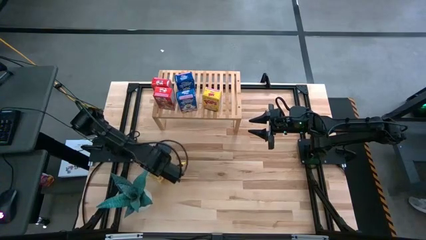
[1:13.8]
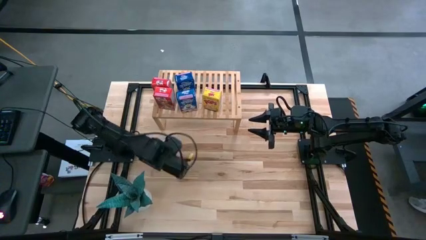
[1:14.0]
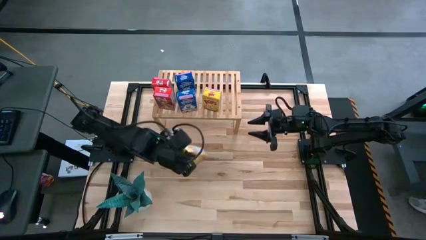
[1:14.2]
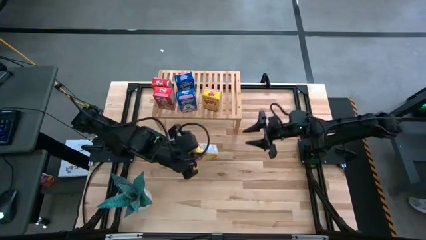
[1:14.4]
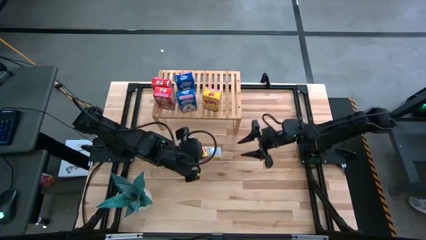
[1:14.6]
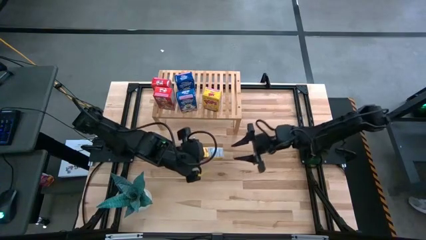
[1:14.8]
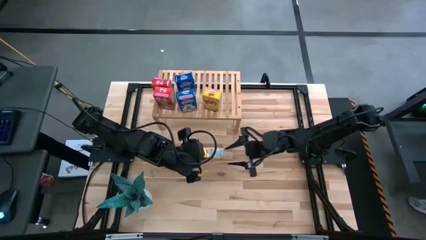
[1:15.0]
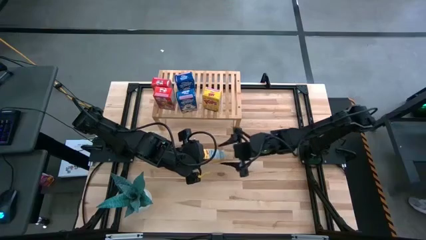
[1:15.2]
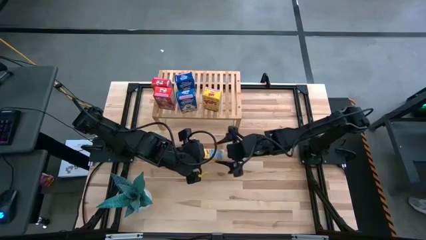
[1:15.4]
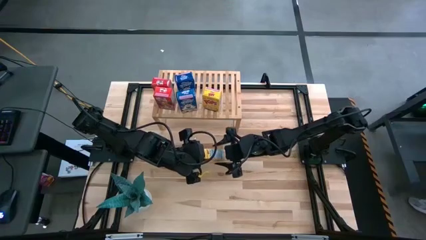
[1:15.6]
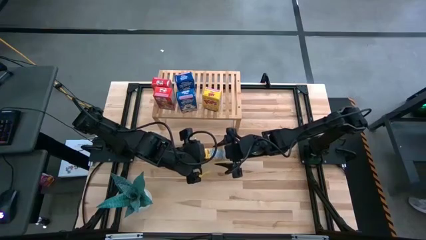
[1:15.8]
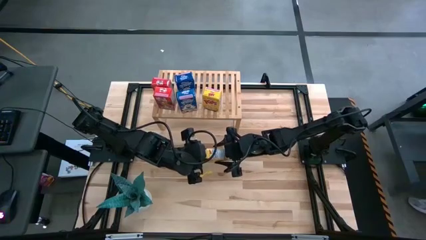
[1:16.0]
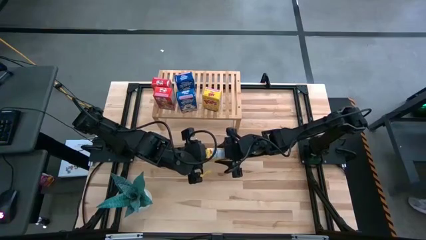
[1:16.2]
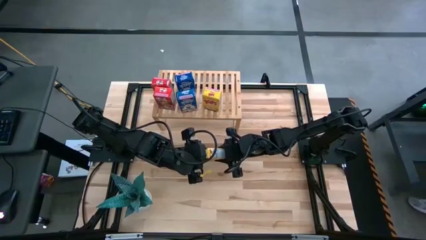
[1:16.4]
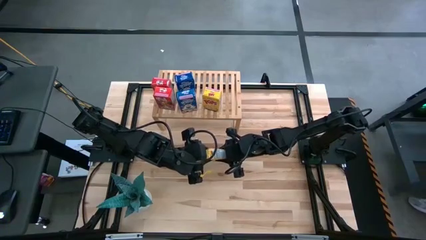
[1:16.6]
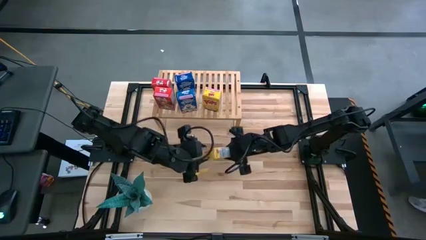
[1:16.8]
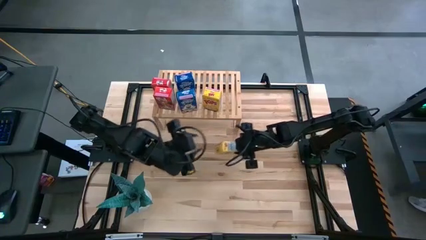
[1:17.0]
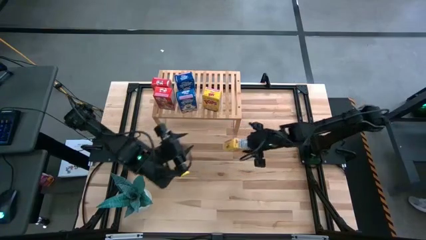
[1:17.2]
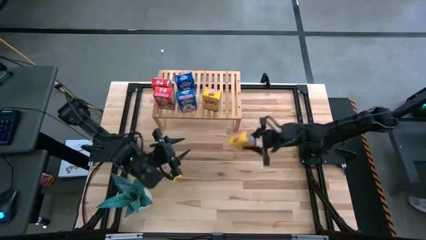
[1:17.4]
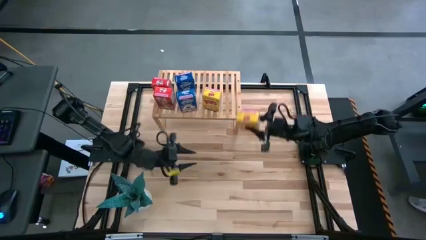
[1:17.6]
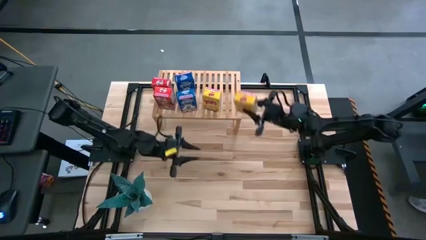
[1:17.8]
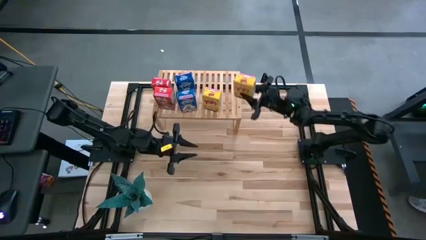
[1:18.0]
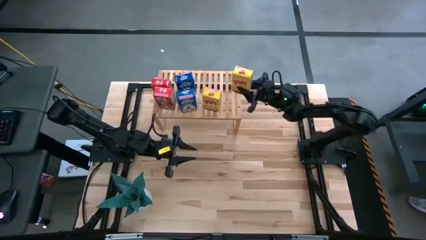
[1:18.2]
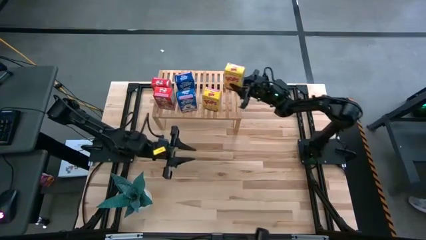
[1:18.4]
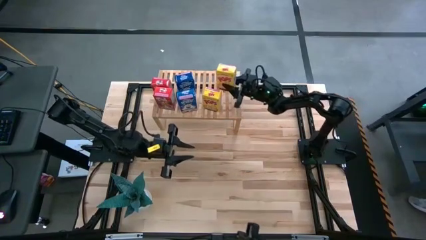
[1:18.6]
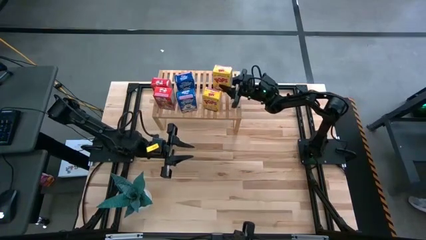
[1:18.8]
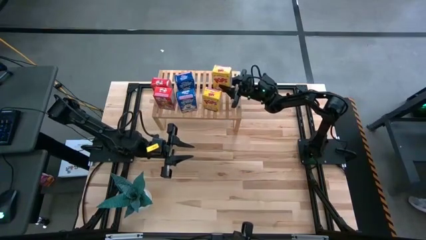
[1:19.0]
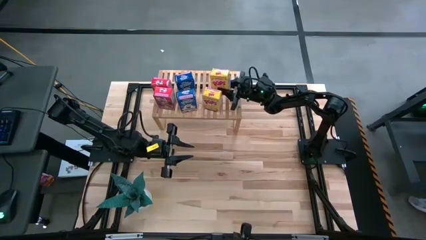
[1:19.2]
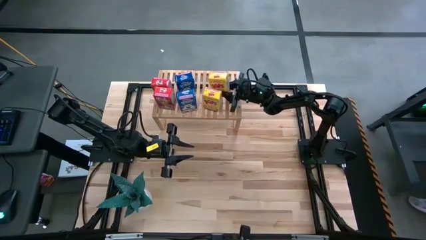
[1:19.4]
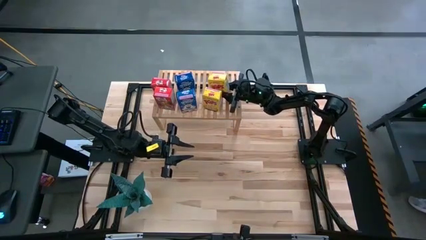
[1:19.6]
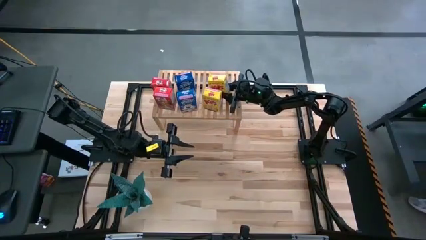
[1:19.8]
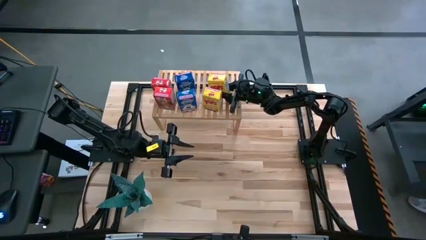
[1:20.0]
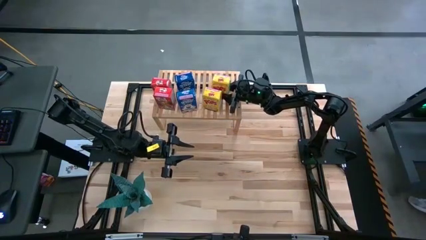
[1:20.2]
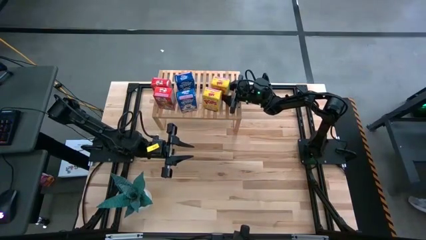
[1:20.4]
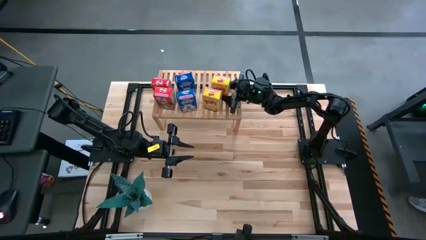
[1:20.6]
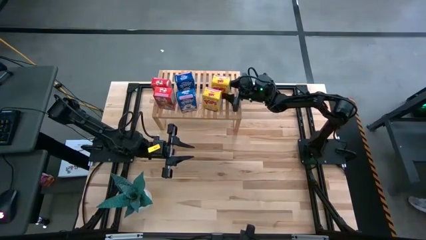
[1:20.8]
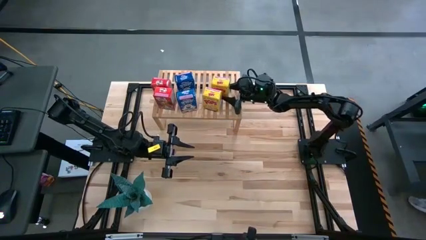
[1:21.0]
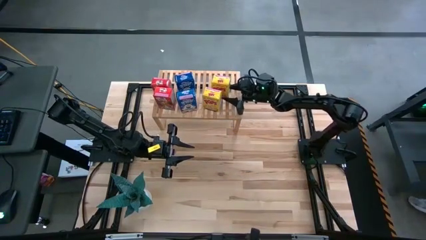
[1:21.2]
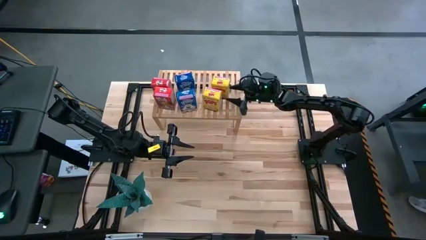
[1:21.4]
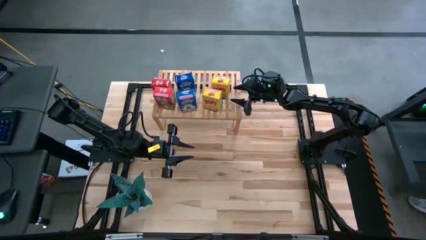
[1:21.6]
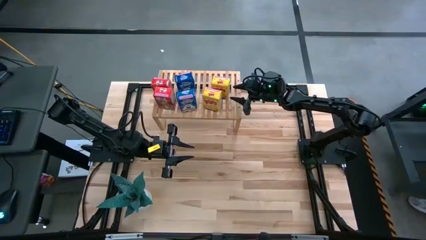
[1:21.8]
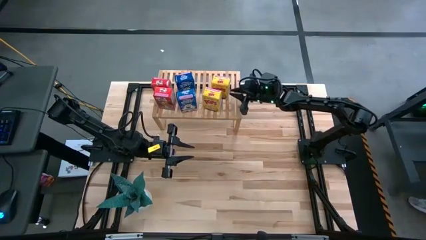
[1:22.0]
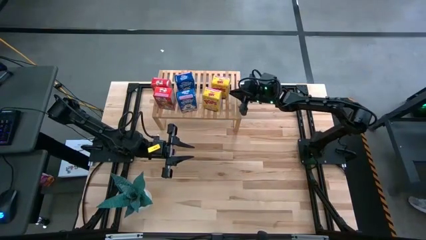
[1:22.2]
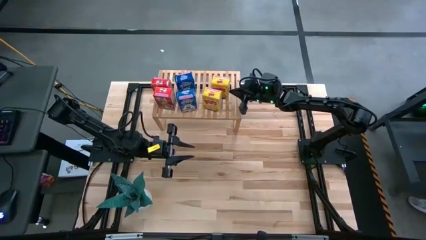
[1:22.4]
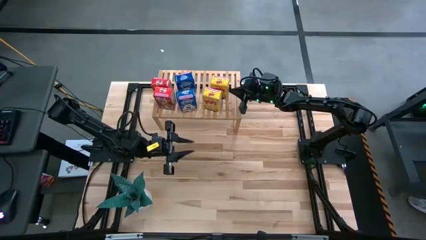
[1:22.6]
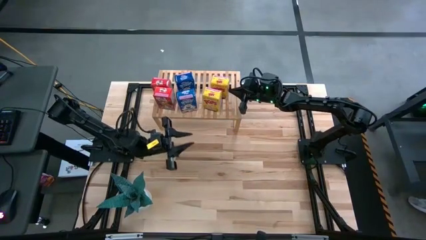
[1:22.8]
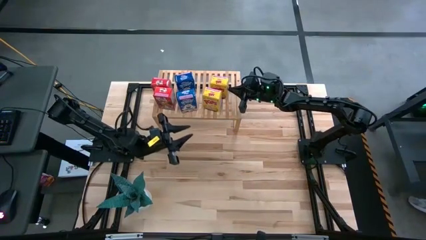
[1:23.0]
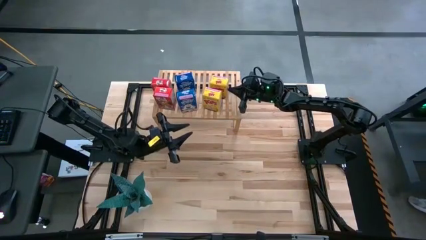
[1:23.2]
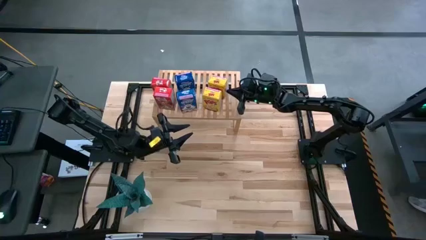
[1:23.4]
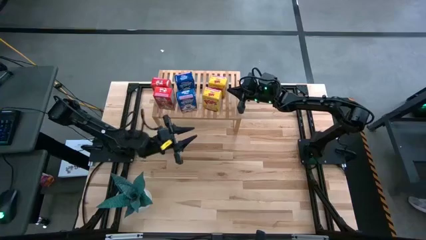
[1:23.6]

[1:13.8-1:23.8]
Task: Stack cereal on shelf
Put the yellow cereal box on the shelf aligned with the other yellow cereal box

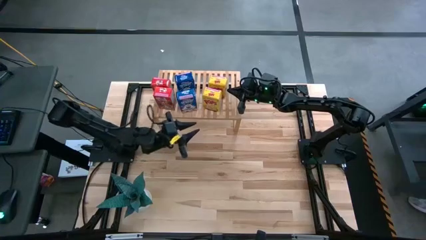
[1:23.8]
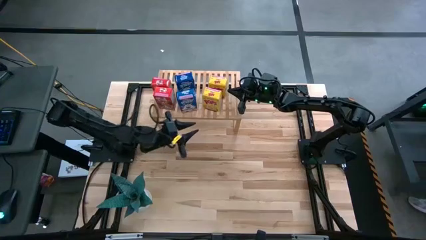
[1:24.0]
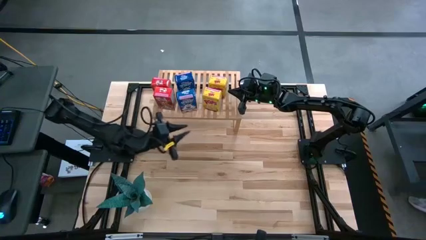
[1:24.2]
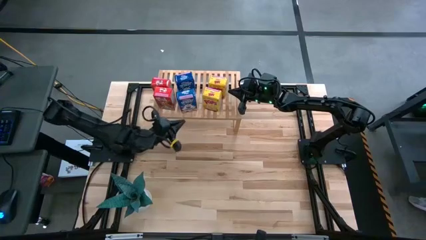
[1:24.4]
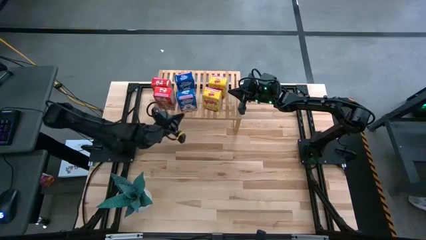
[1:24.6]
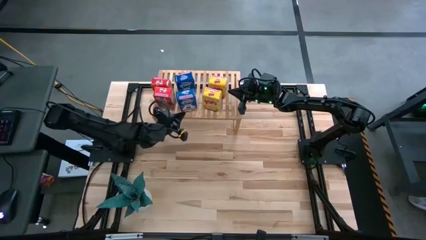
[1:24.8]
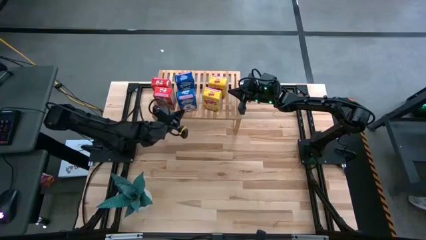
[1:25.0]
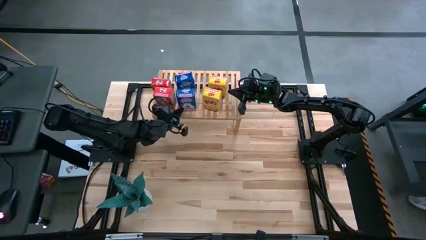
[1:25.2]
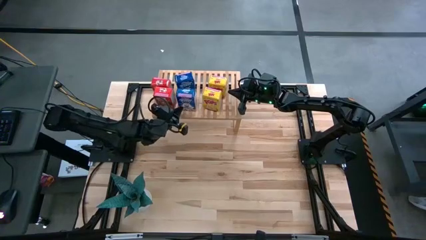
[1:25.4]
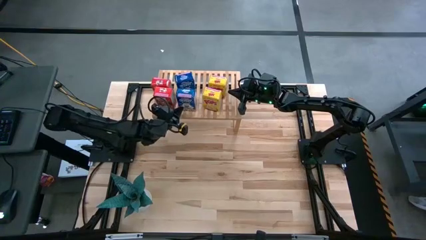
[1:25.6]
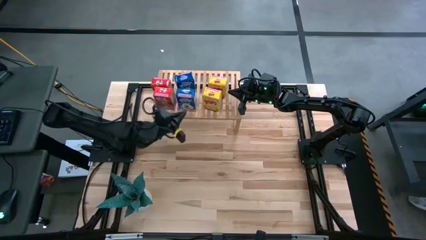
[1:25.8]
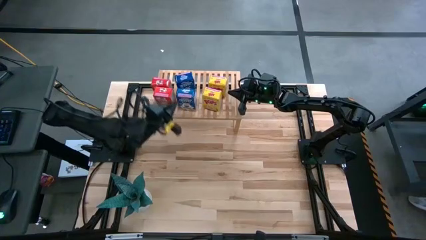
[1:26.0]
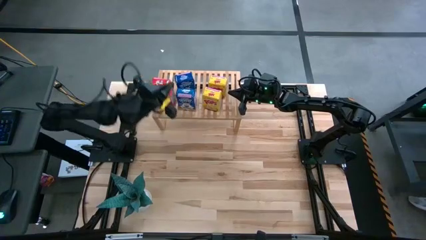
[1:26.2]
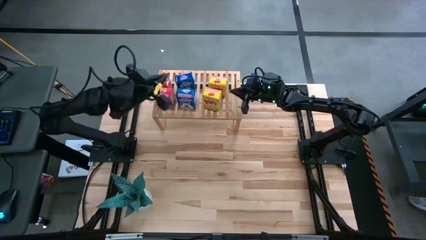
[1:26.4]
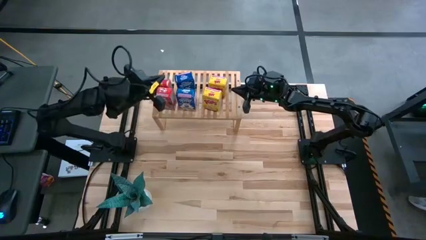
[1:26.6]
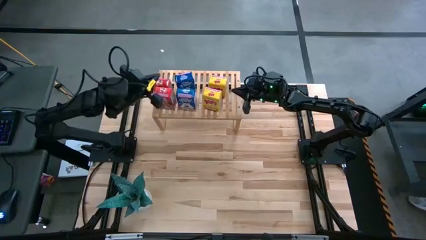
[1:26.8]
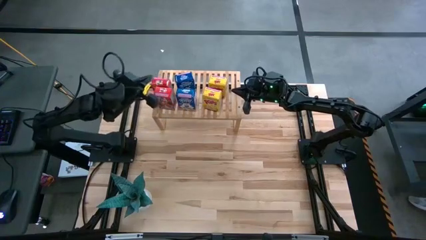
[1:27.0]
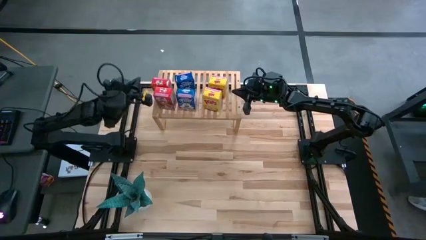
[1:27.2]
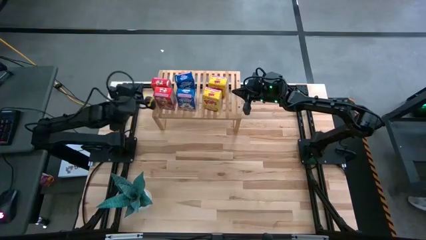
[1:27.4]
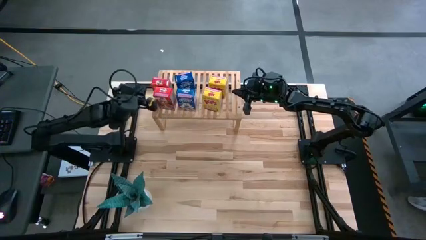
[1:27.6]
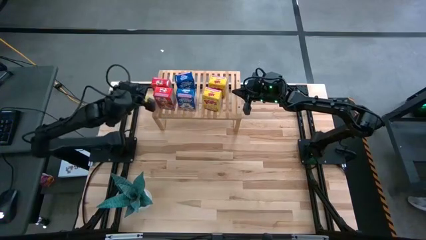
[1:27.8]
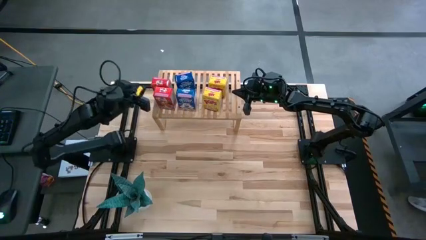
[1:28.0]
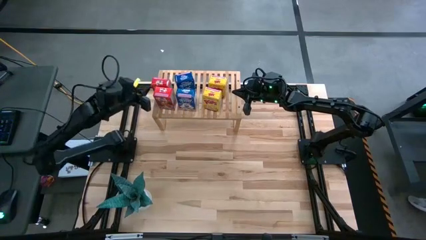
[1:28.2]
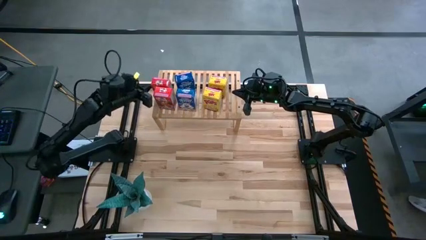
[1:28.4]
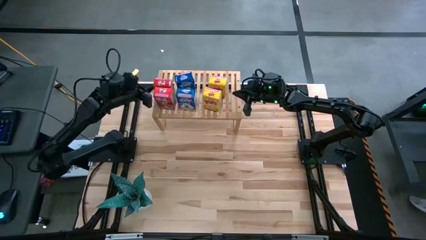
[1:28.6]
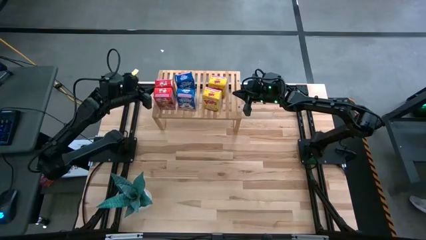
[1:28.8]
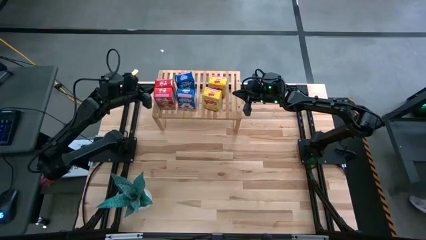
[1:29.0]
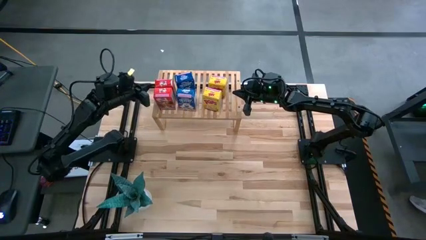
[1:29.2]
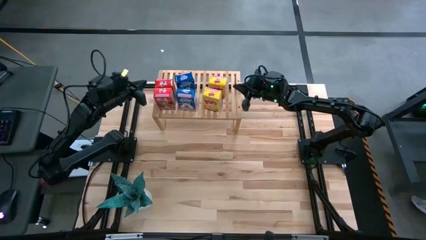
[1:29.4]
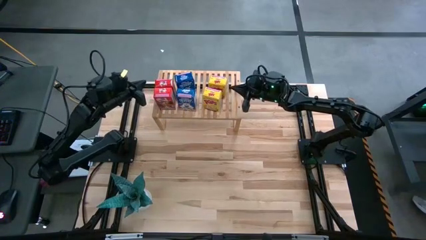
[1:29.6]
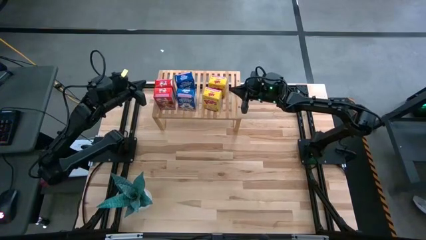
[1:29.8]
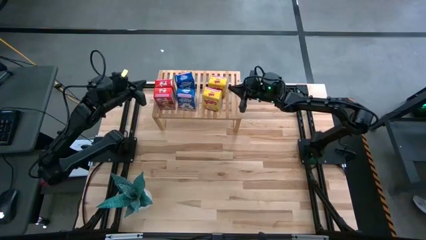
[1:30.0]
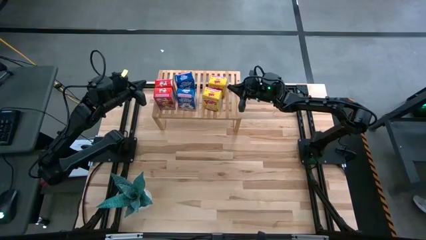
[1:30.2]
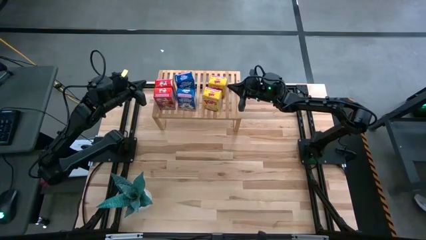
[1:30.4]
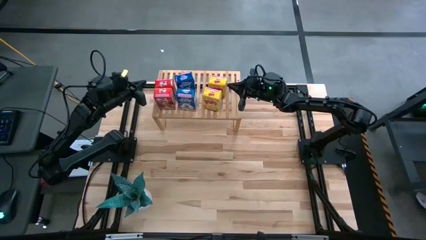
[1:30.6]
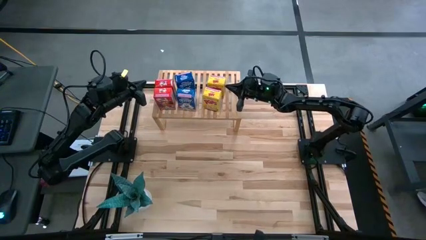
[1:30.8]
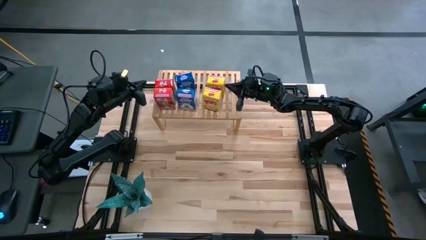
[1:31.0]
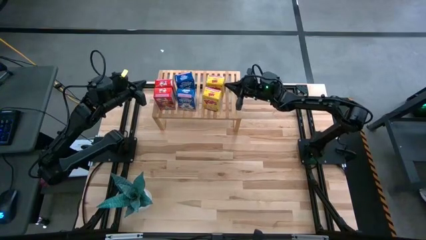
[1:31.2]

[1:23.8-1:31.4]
Adjust the cereal boxes on the shelf
